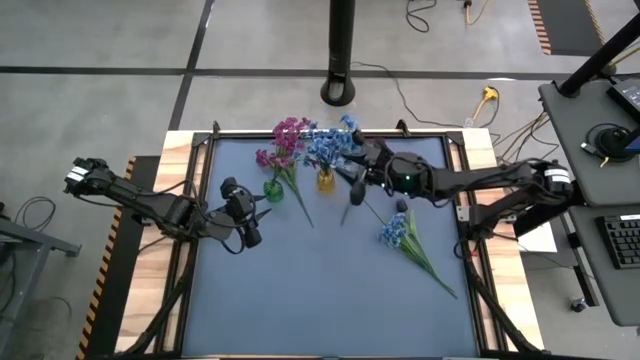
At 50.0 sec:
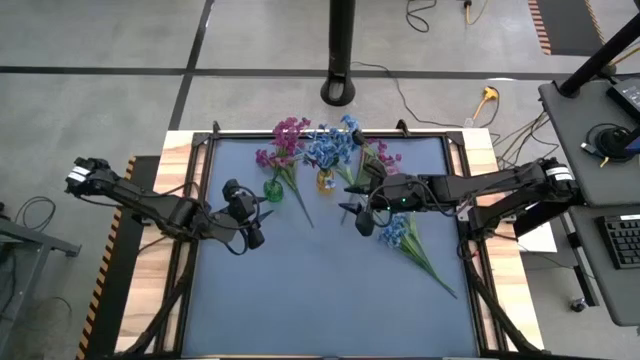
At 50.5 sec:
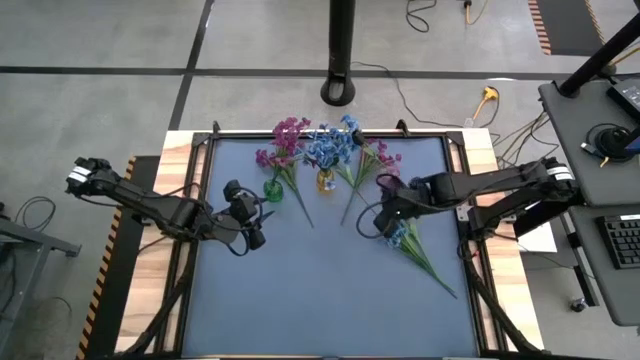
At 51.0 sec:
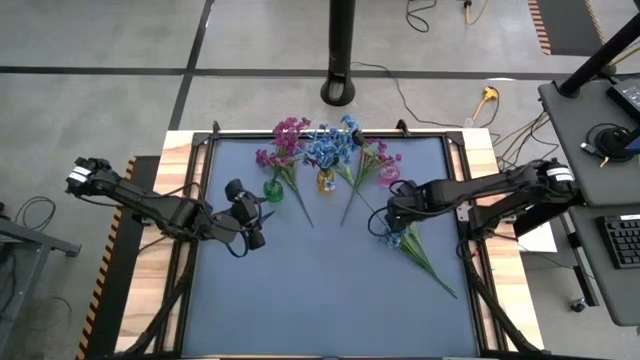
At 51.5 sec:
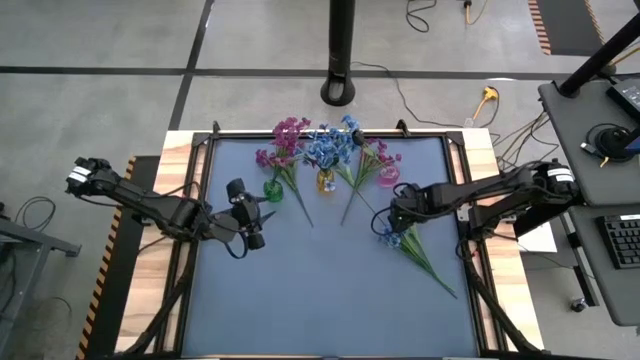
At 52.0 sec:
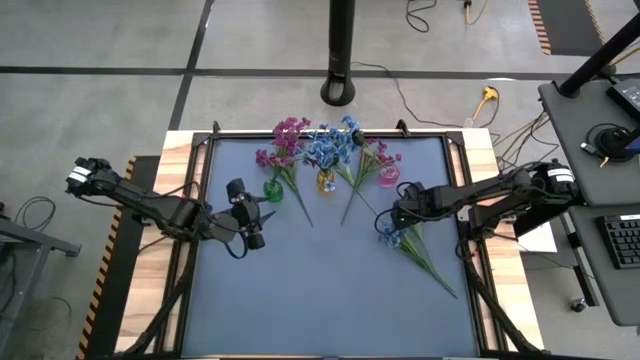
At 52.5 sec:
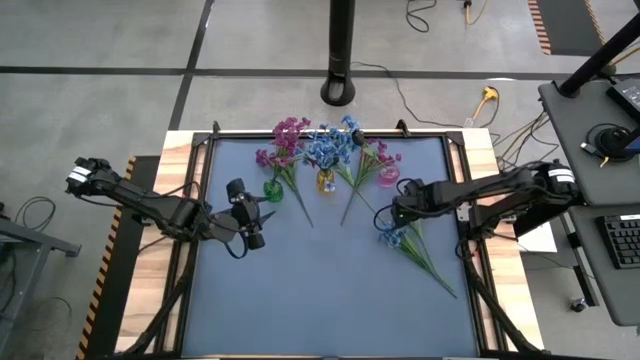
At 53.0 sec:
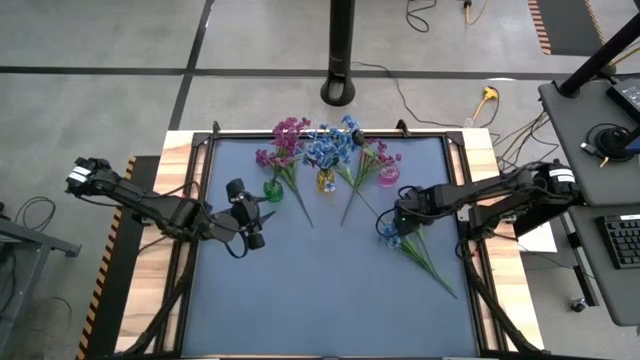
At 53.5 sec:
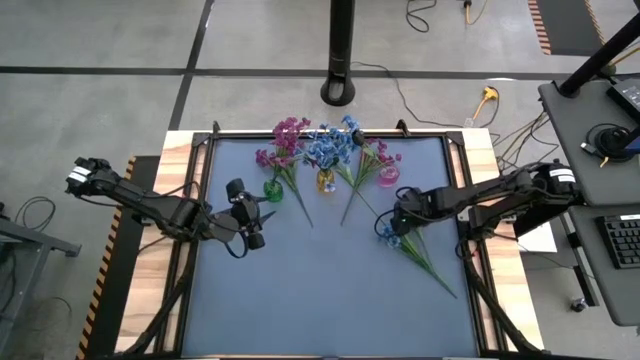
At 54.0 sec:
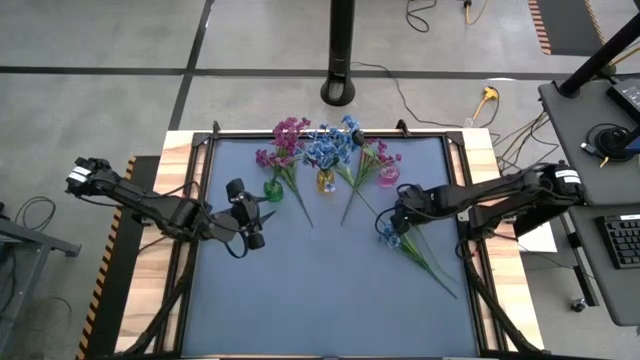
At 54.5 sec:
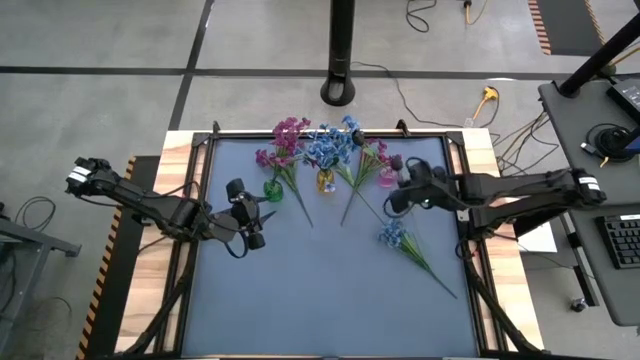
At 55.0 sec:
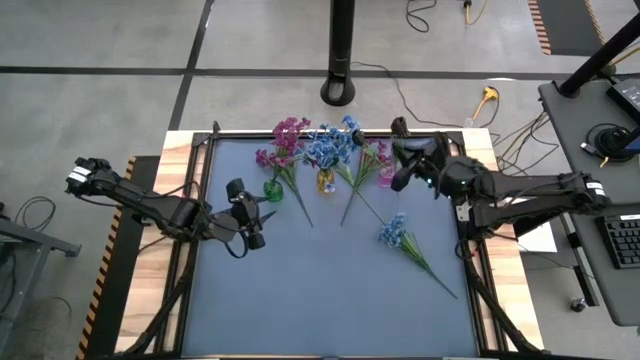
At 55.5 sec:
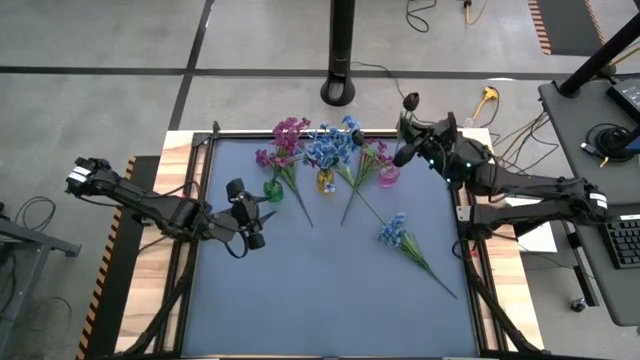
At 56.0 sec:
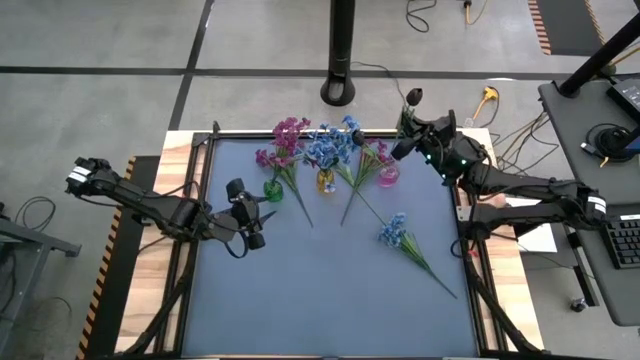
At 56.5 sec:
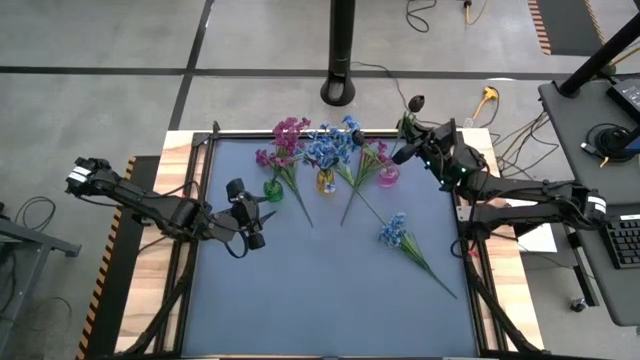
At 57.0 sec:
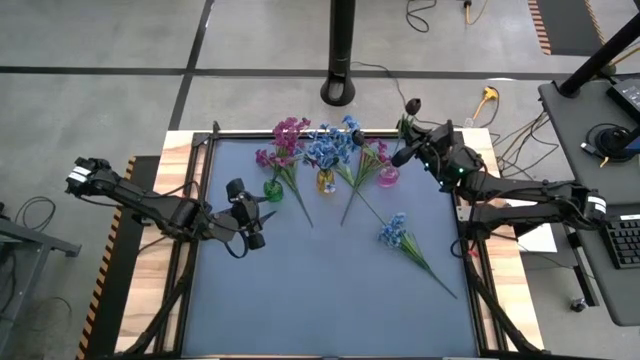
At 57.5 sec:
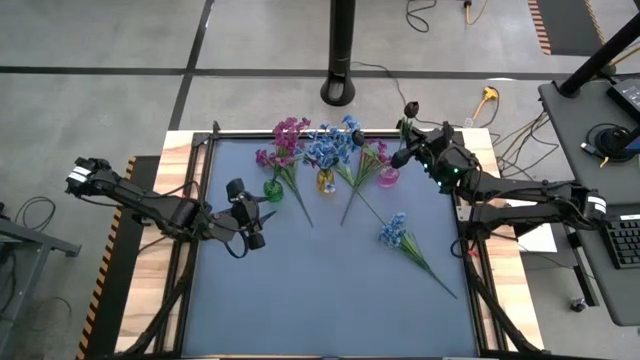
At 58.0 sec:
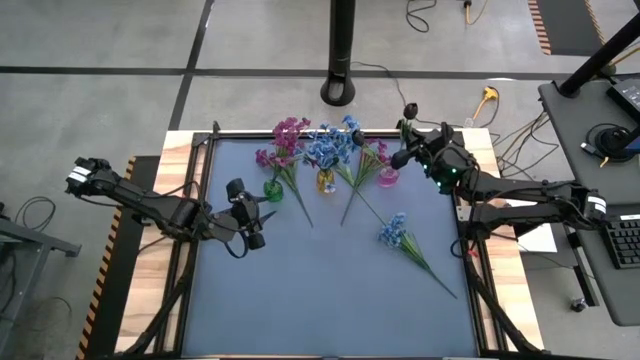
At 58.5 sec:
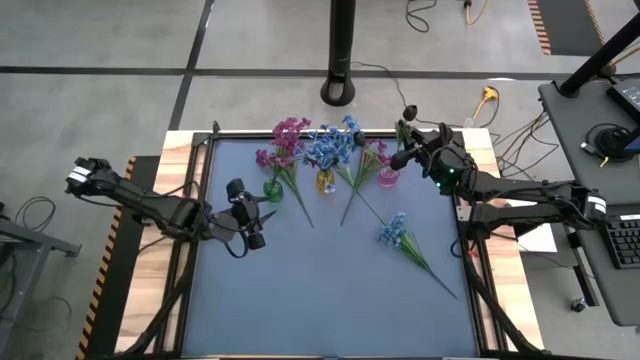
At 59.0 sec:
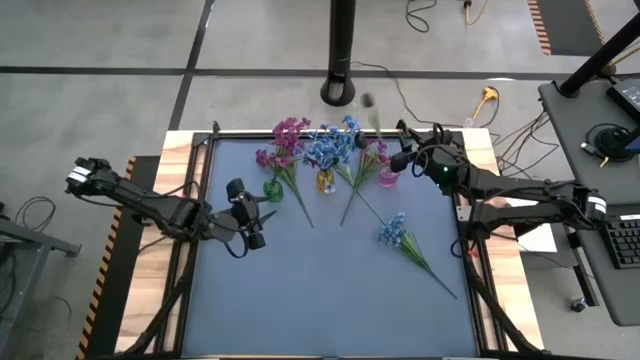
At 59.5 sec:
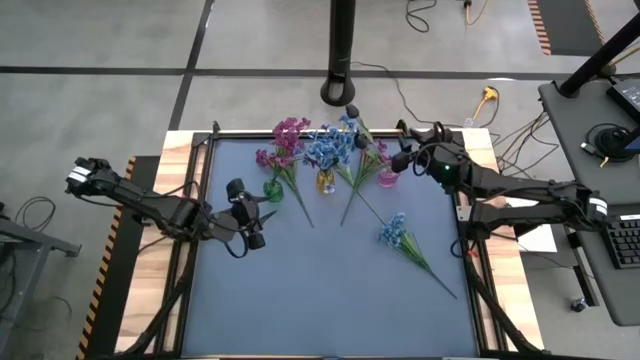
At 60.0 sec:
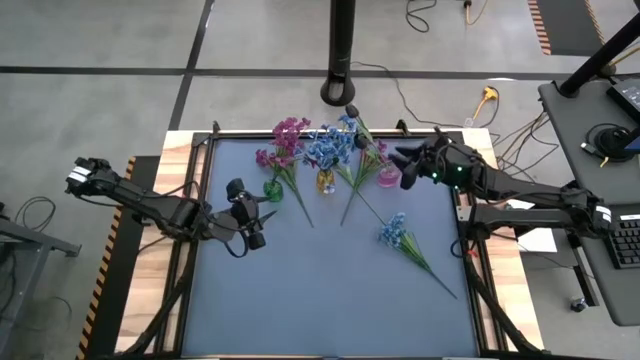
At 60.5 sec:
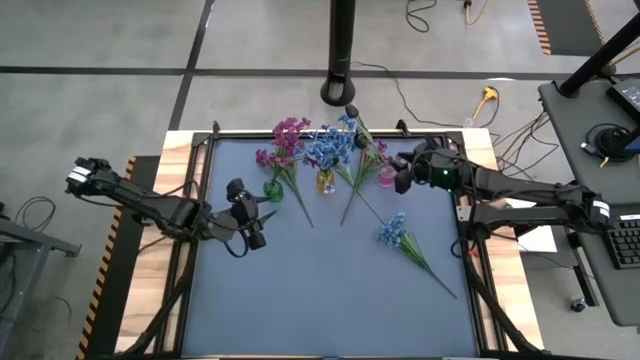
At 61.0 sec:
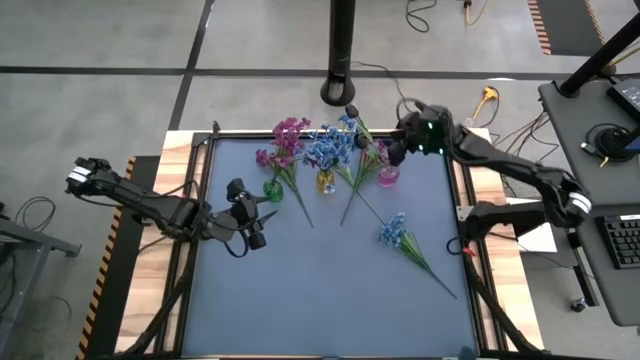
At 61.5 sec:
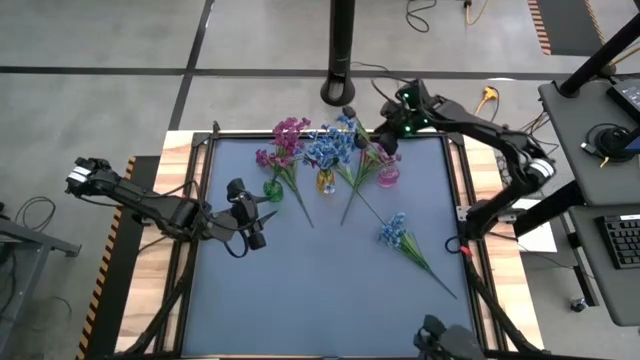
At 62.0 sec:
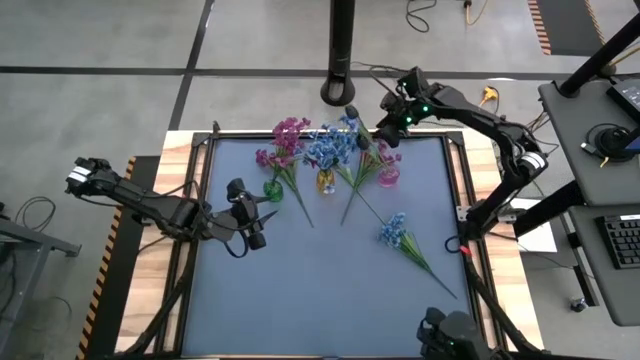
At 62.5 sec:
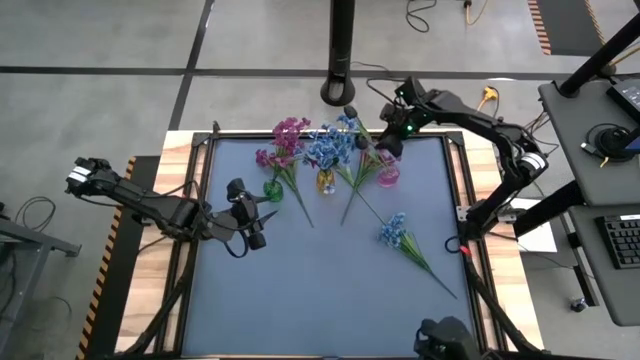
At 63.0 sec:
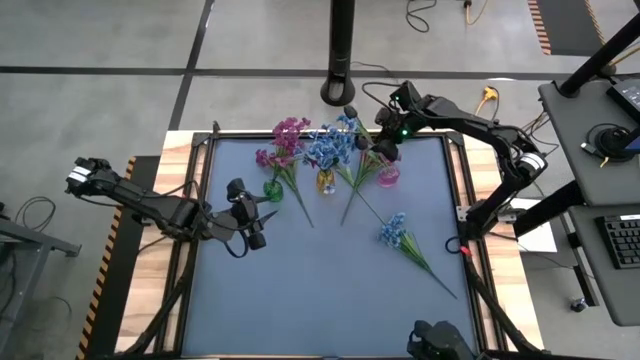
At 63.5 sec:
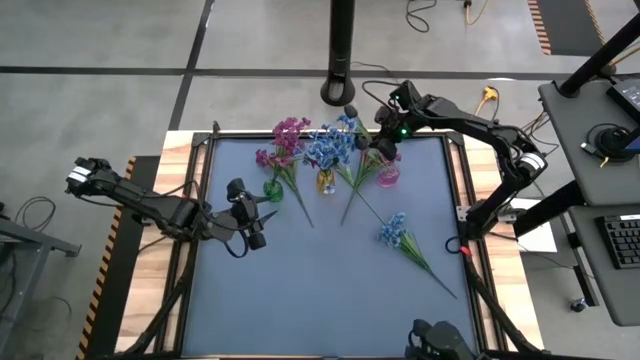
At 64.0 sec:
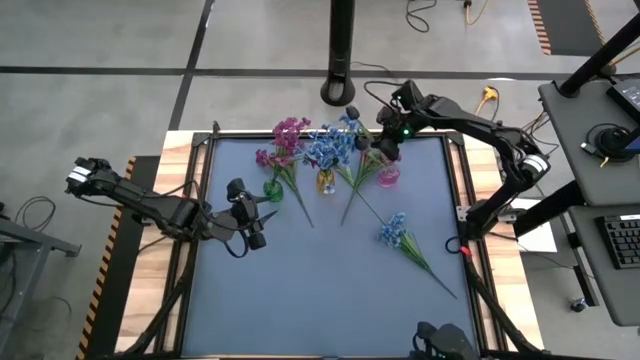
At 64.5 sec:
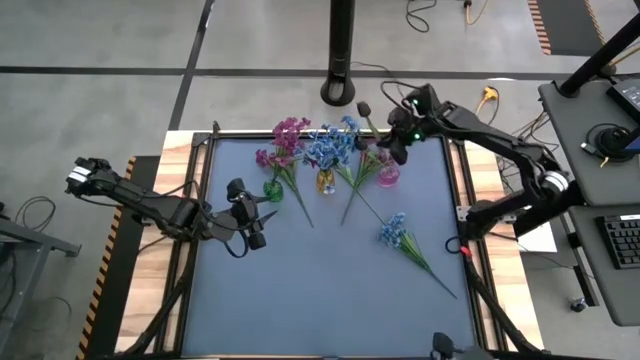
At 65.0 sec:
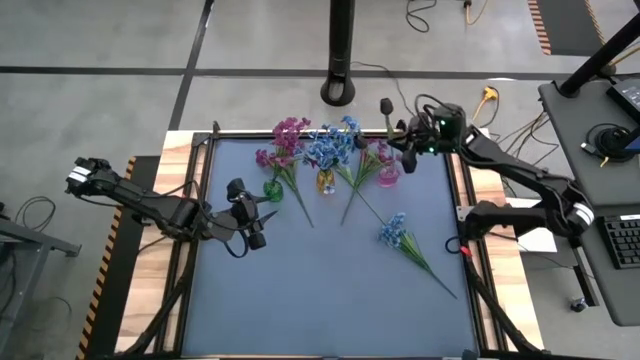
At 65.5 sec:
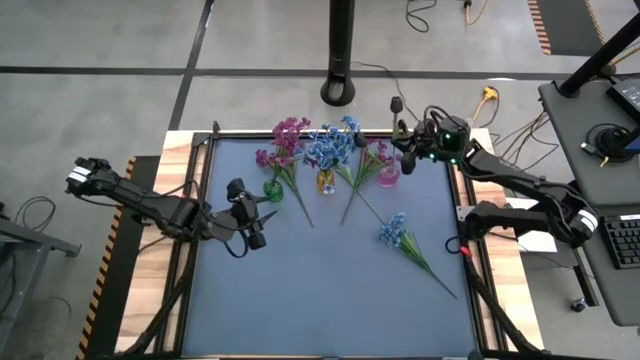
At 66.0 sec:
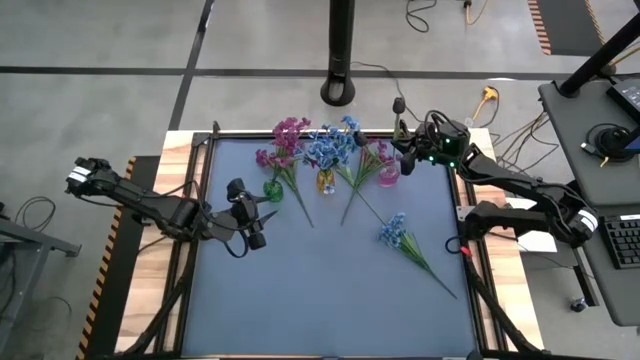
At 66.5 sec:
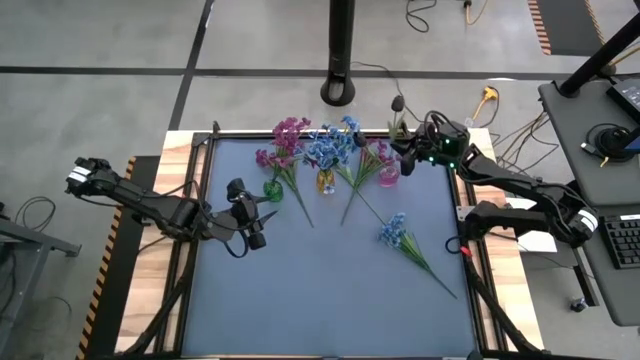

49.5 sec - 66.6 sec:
Task: Sort flowers into vase by color
Put the bottom black flower into the purple flower vase
